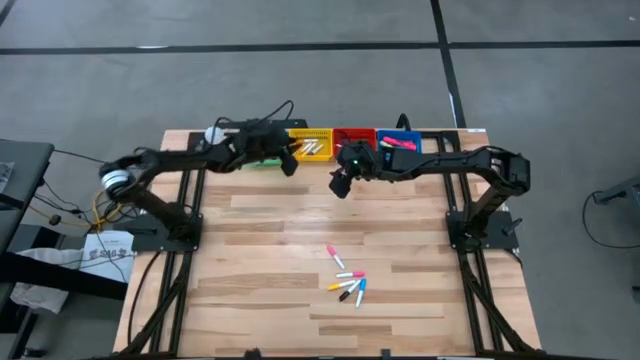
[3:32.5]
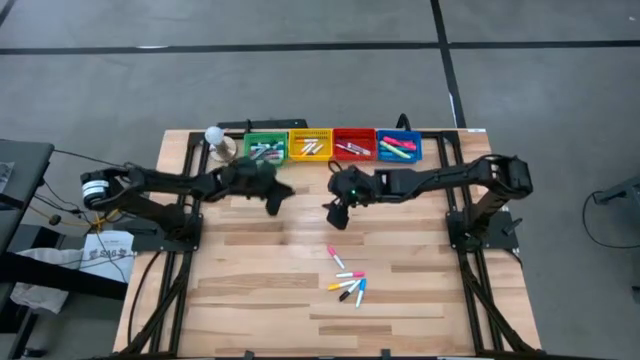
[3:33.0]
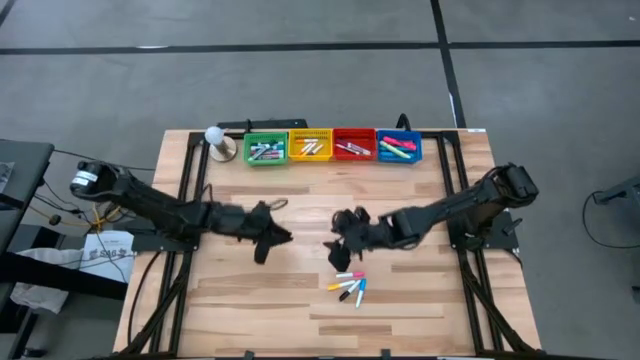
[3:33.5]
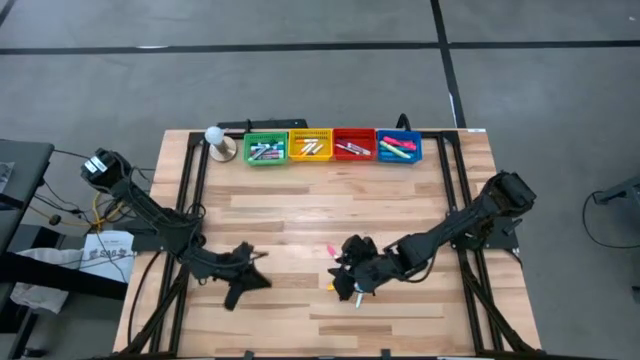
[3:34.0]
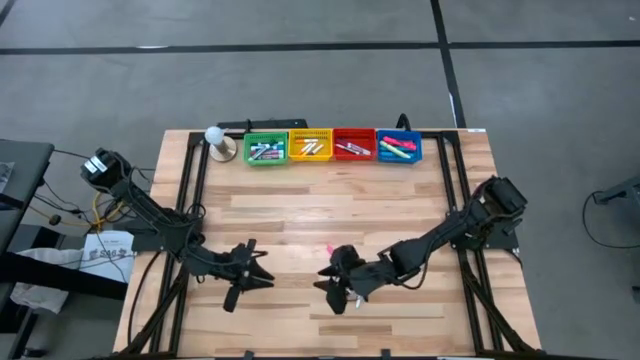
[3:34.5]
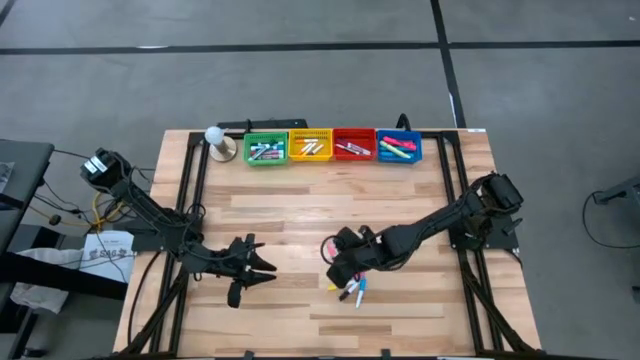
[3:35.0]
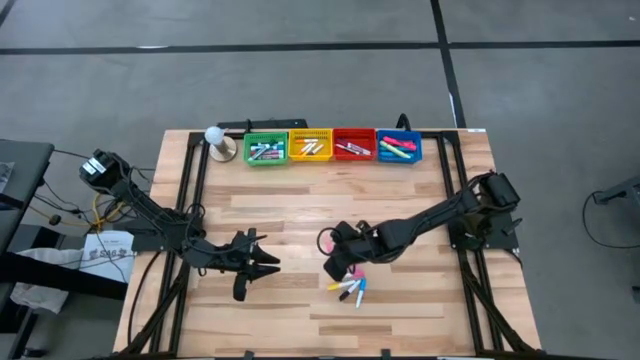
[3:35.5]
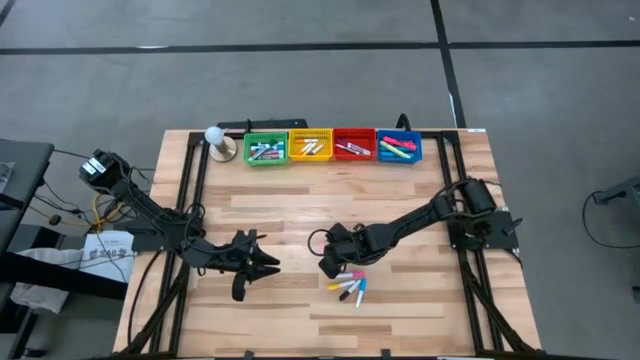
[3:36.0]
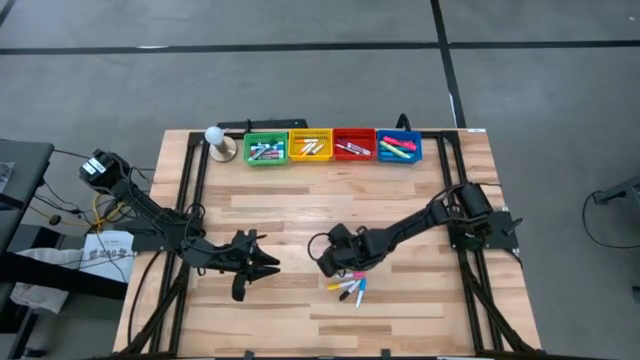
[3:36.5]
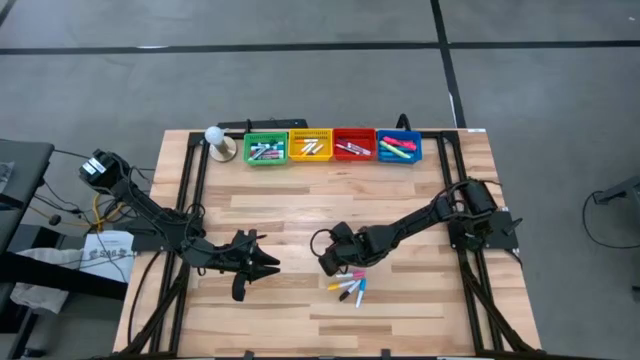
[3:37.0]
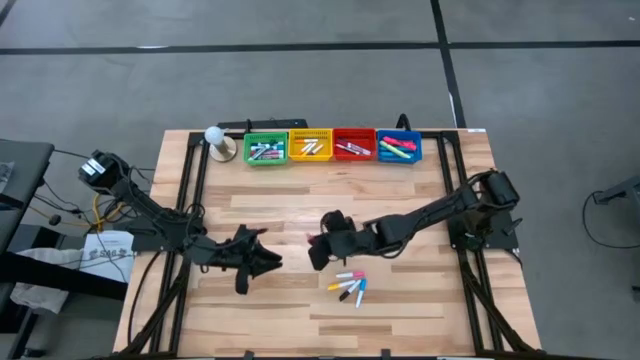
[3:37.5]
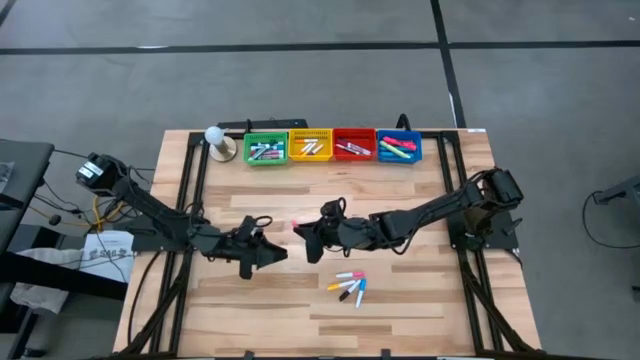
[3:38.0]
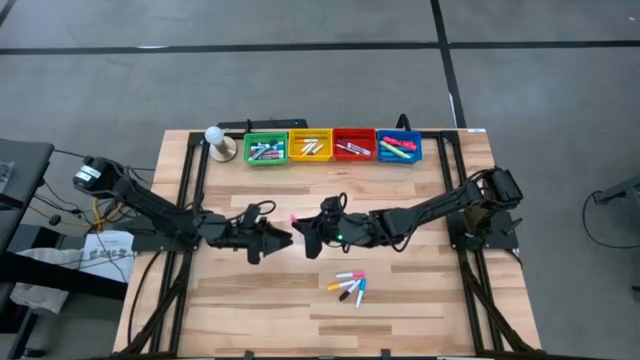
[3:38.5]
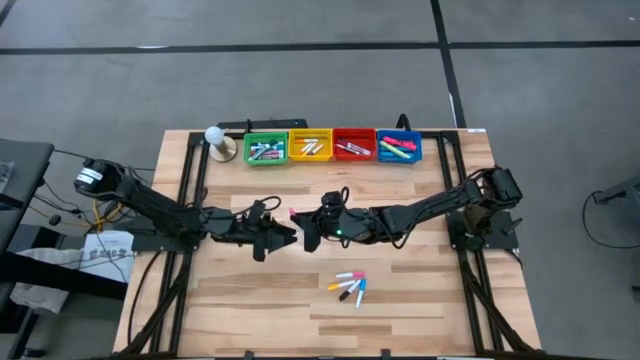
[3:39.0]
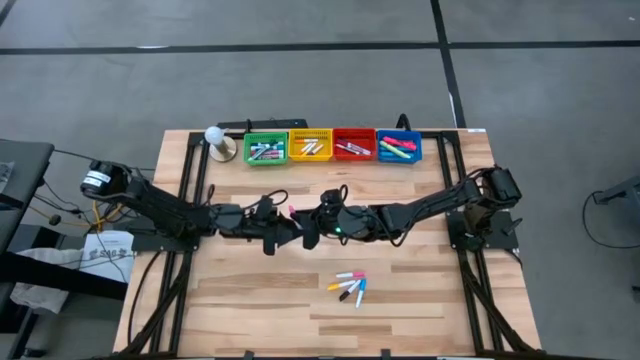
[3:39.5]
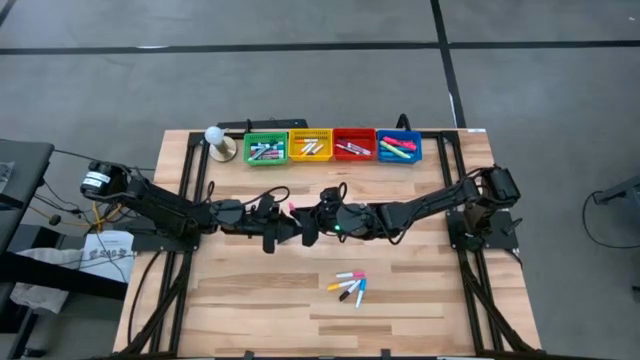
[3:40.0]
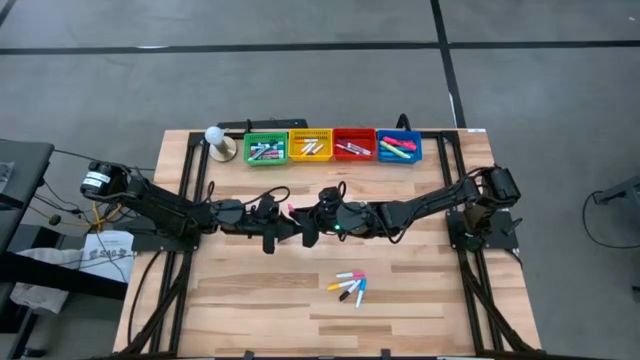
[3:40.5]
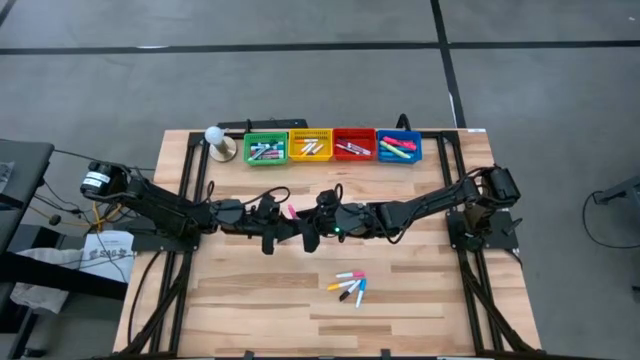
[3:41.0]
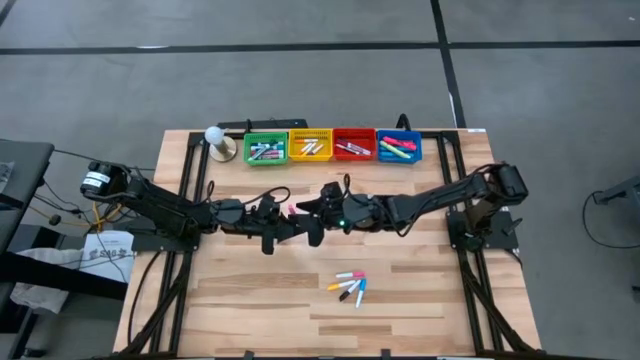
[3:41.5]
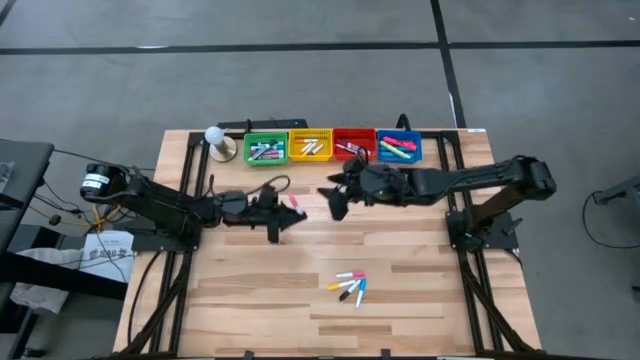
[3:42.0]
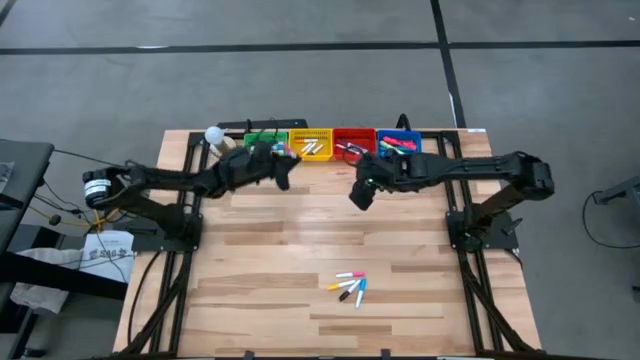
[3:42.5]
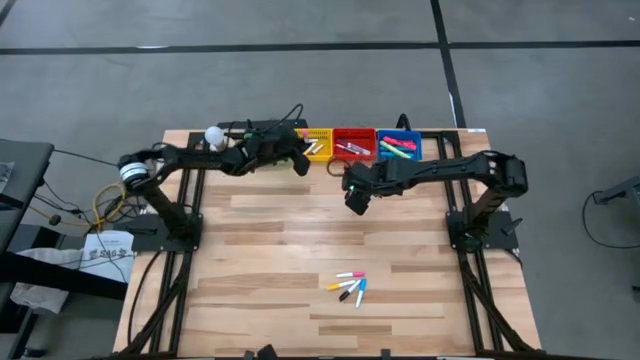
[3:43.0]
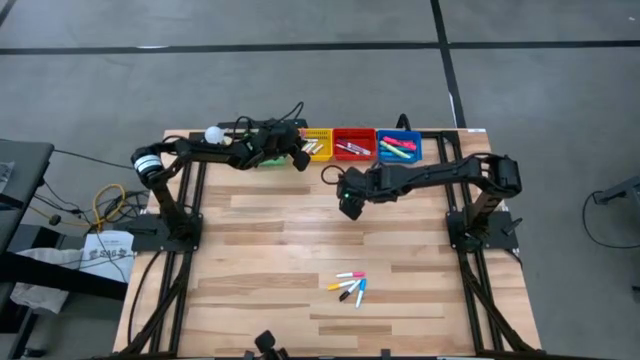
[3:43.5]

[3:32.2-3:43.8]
Task: Pick & Place Markers
Put the pink highlighter pen into the yellow basket

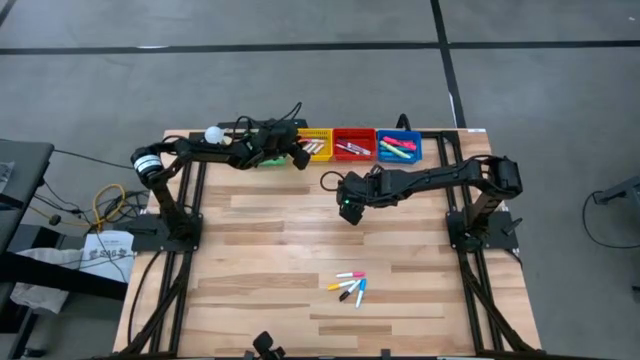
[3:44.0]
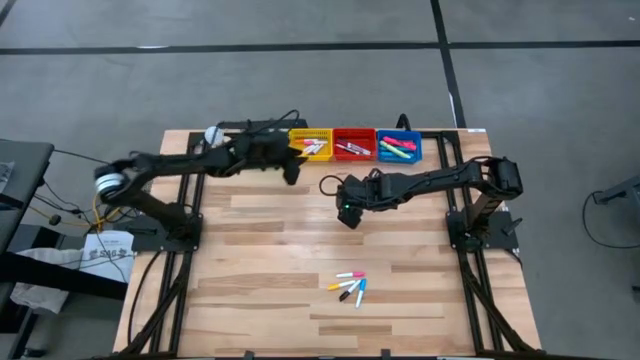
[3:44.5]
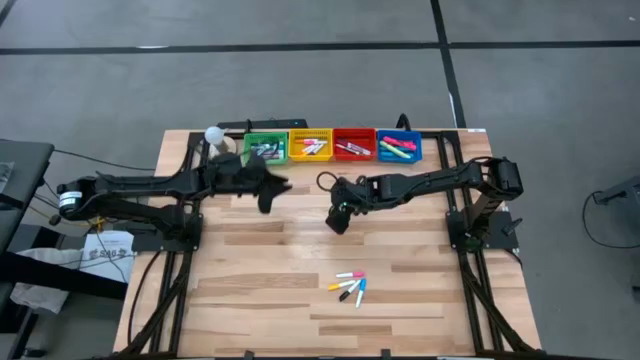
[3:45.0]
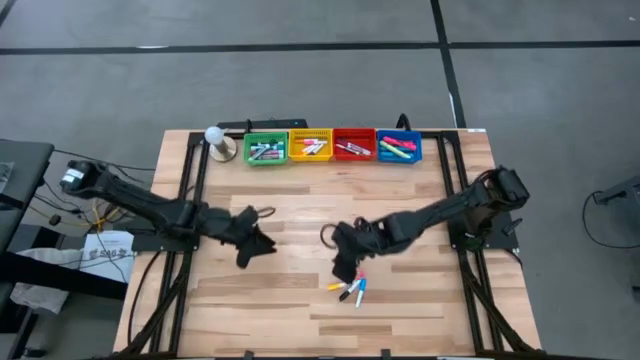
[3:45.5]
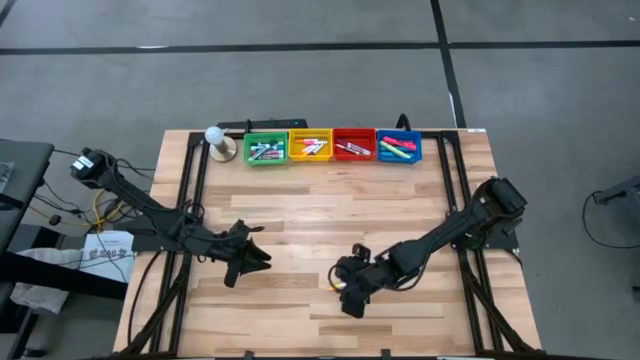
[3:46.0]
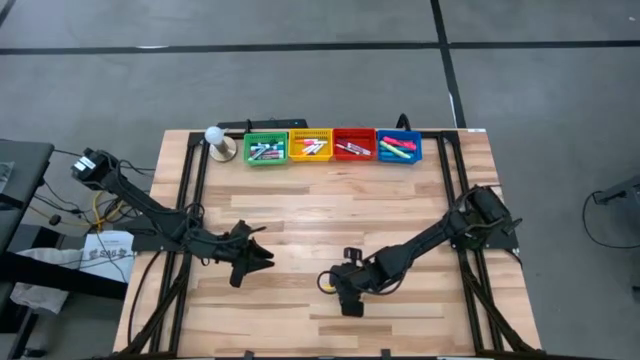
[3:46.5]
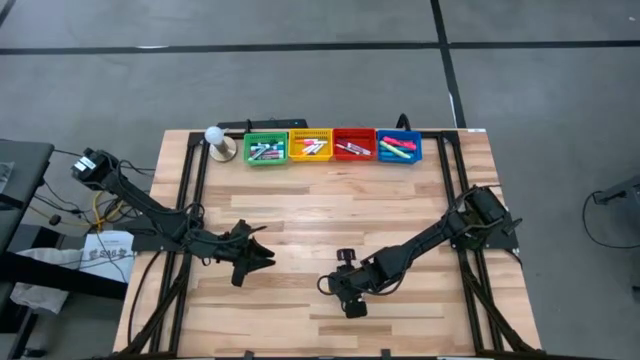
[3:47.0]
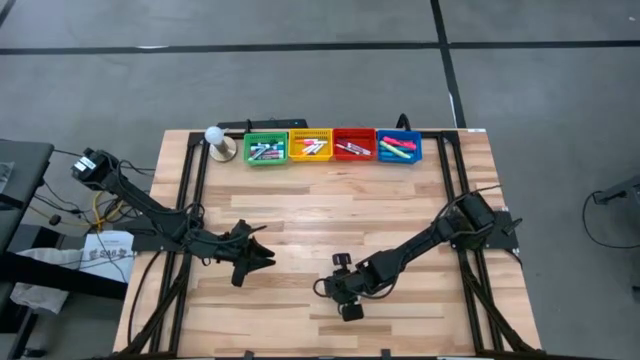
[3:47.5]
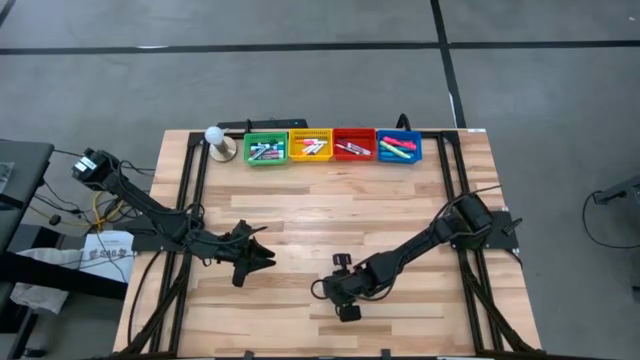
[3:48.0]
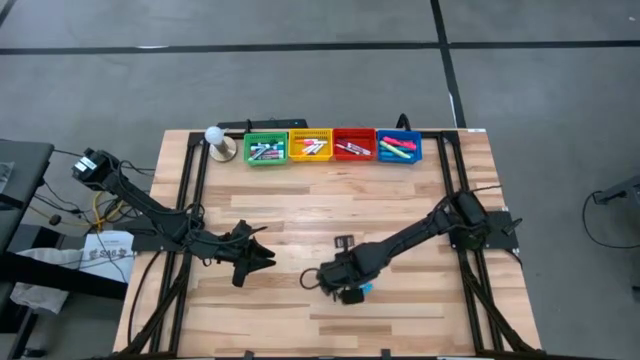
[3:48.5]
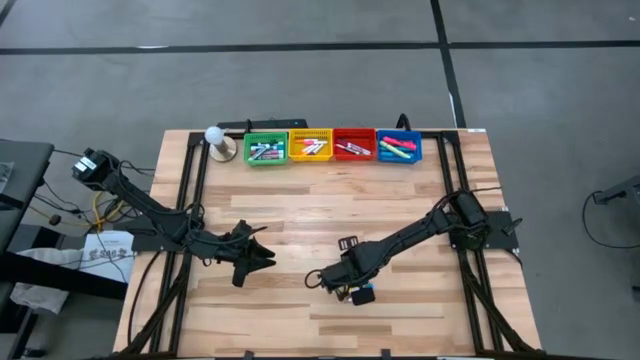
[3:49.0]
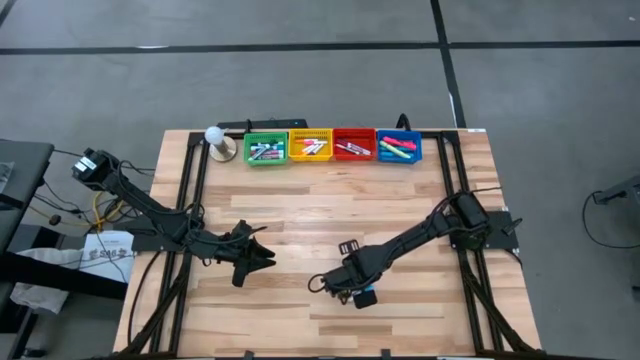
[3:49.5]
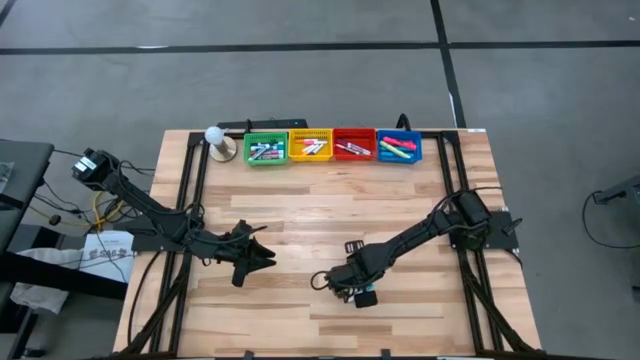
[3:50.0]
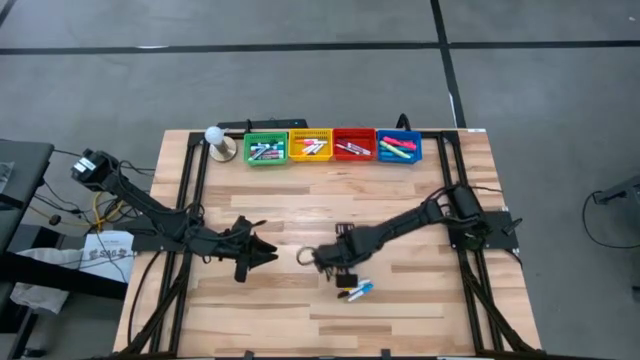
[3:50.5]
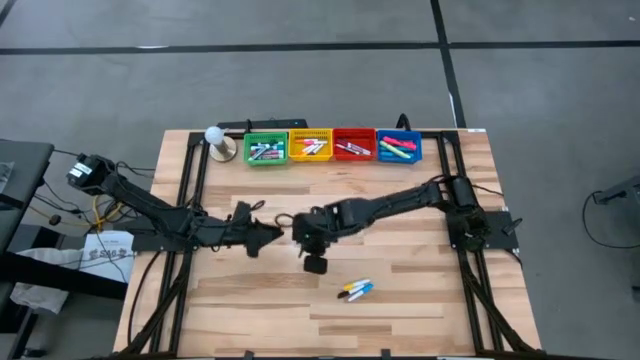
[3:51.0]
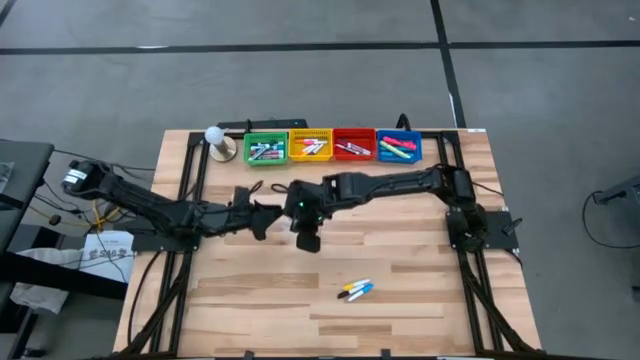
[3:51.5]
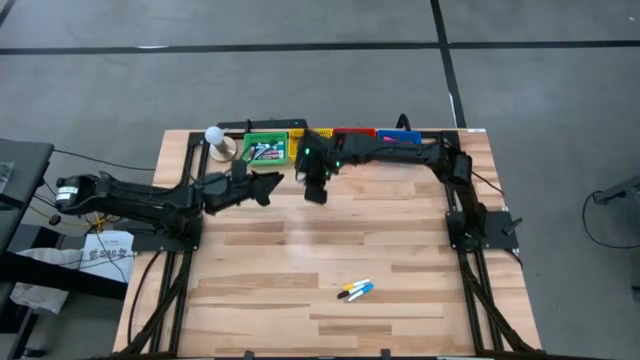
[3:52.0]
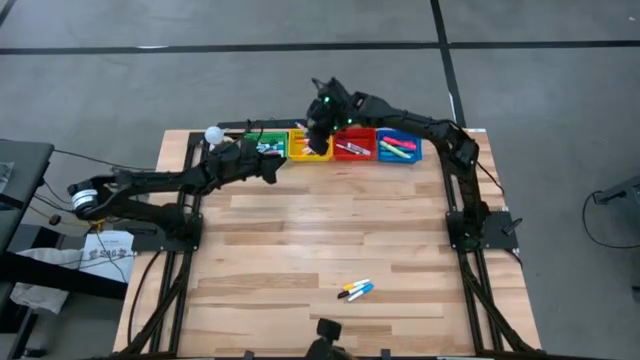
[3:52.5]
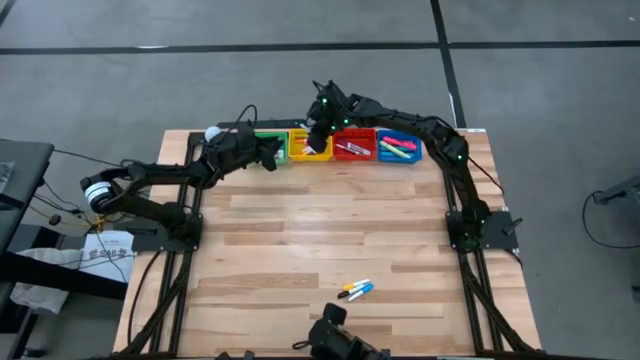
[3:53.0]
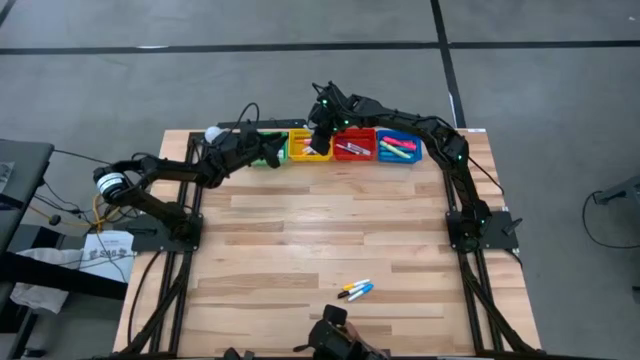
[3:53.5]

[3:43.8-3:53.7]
Put the pink highlighter pen into the yellow basket
